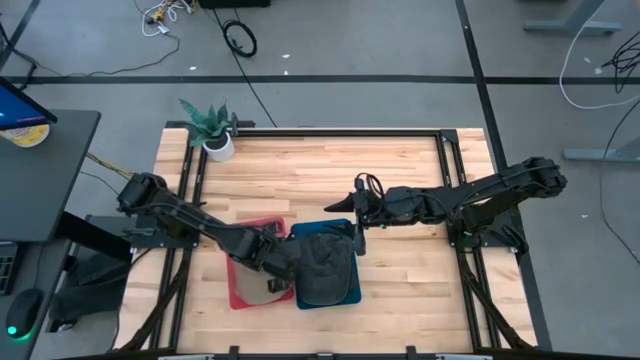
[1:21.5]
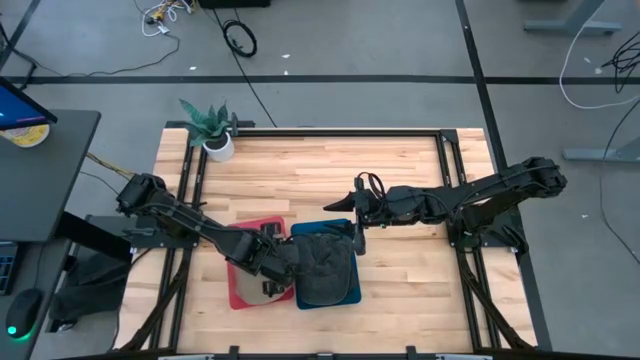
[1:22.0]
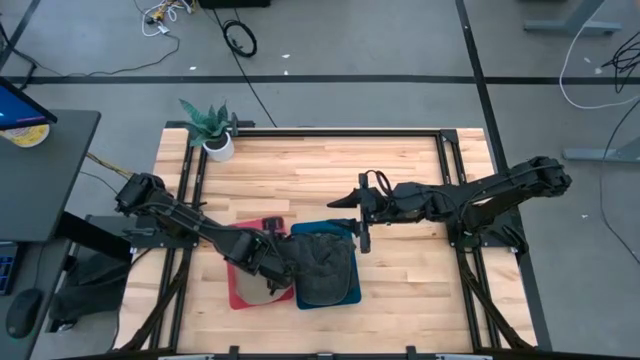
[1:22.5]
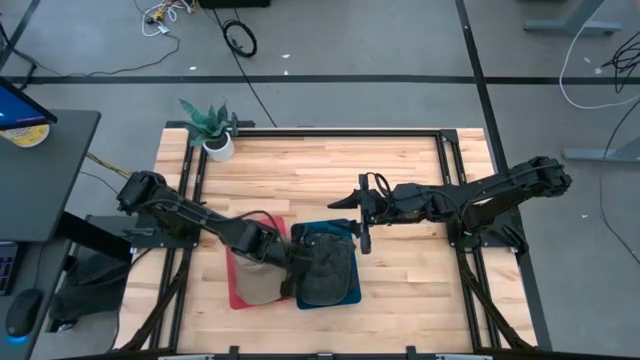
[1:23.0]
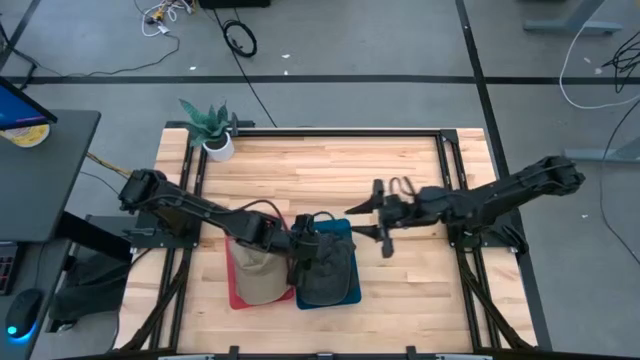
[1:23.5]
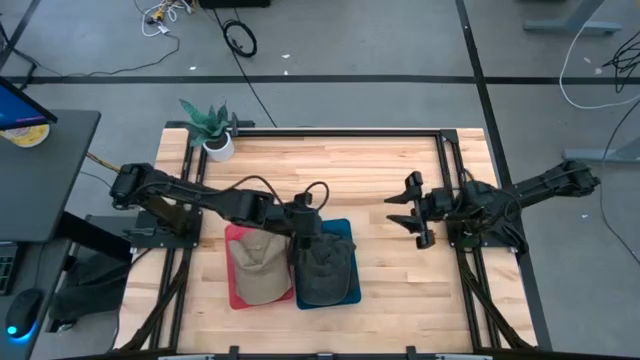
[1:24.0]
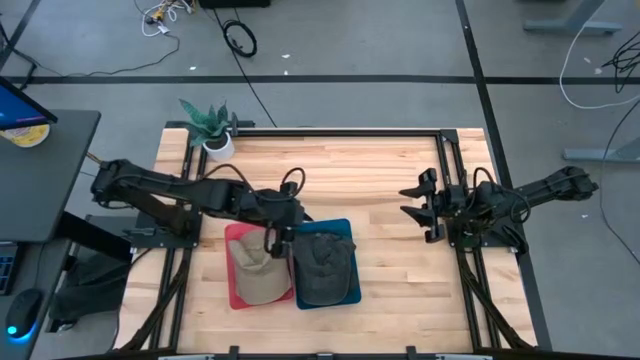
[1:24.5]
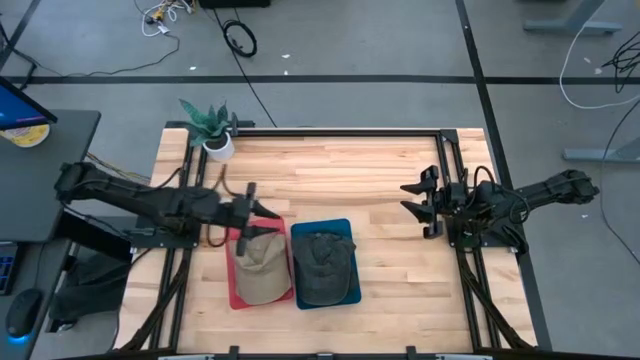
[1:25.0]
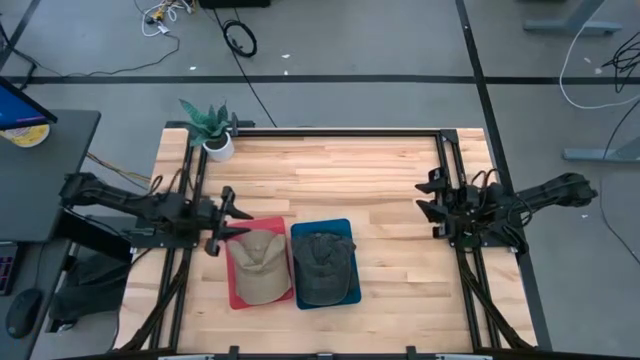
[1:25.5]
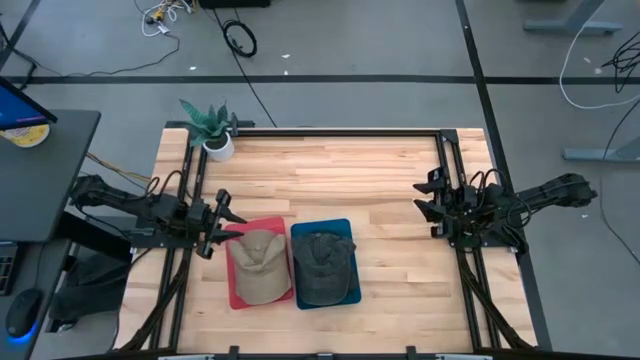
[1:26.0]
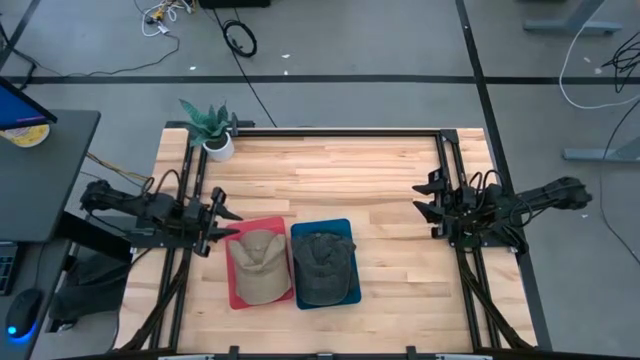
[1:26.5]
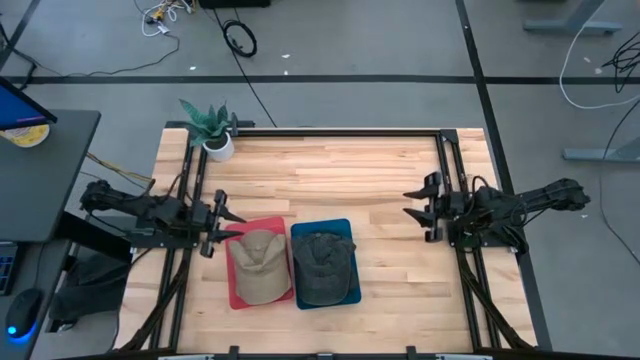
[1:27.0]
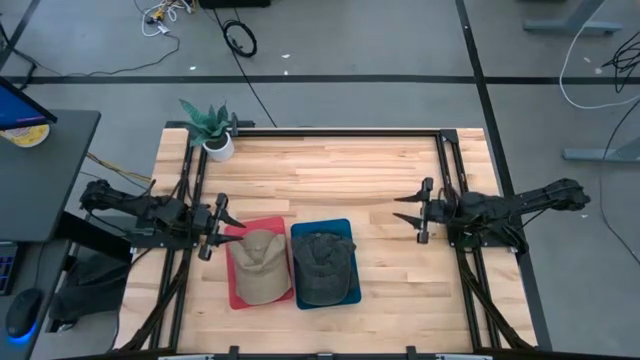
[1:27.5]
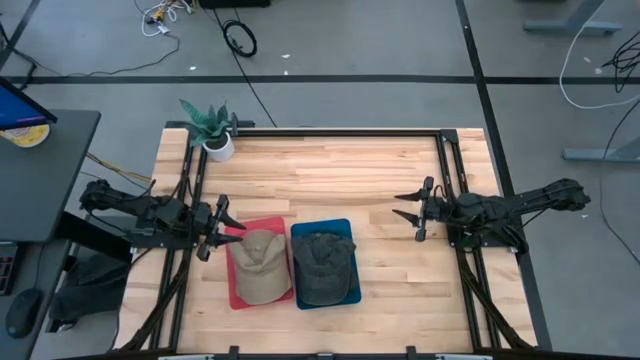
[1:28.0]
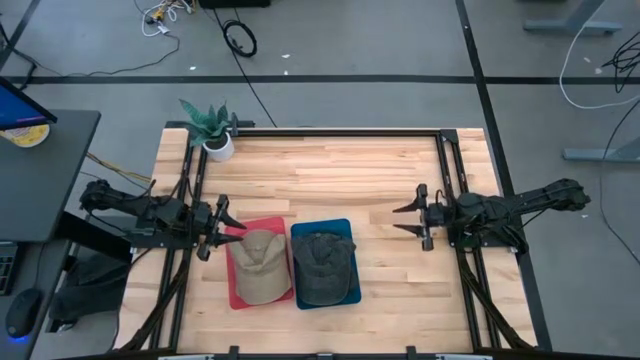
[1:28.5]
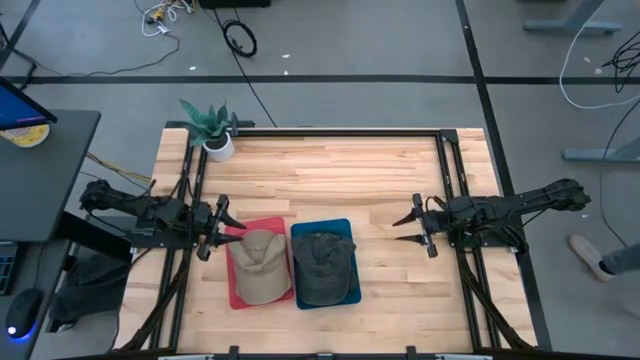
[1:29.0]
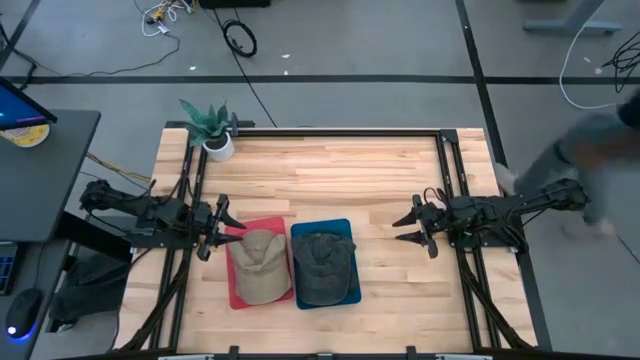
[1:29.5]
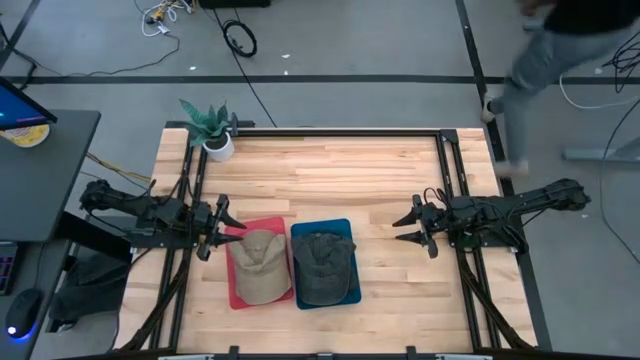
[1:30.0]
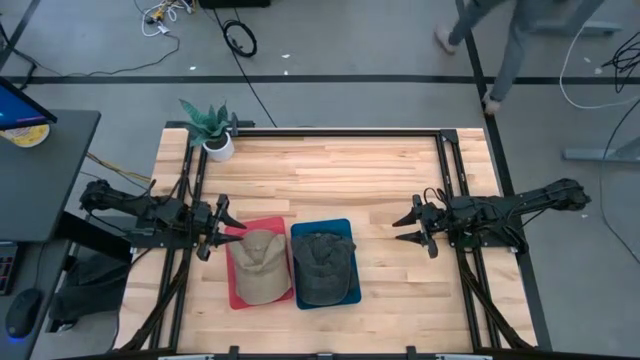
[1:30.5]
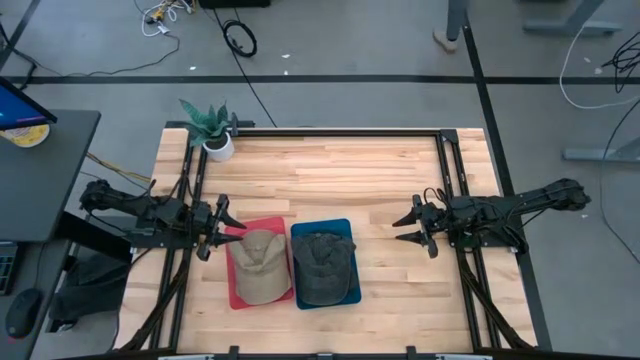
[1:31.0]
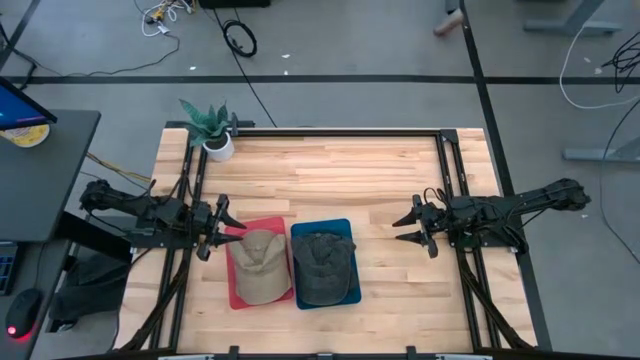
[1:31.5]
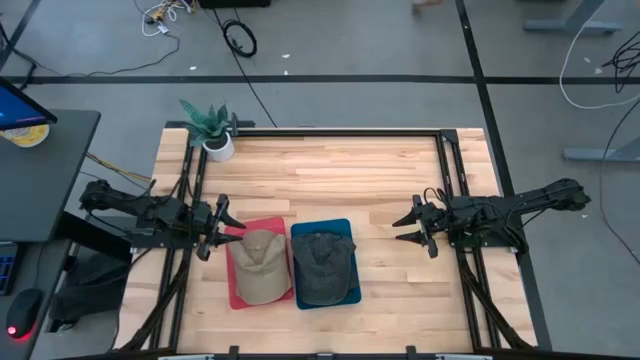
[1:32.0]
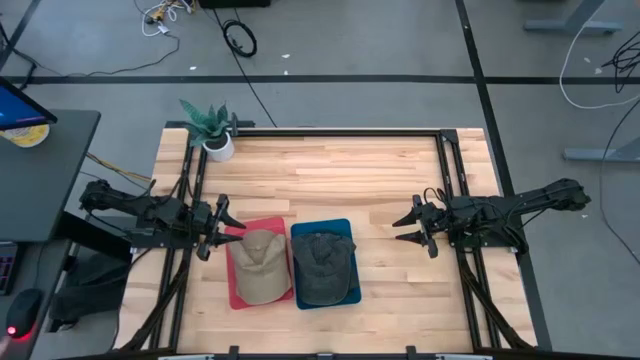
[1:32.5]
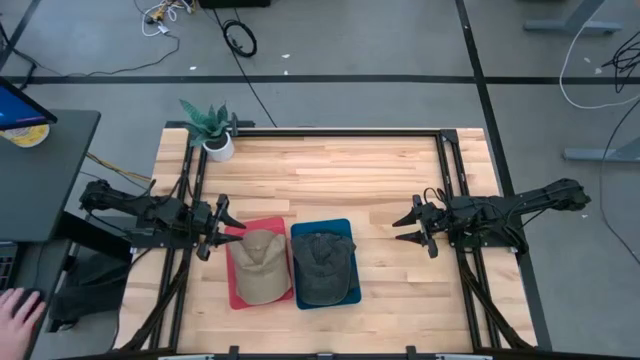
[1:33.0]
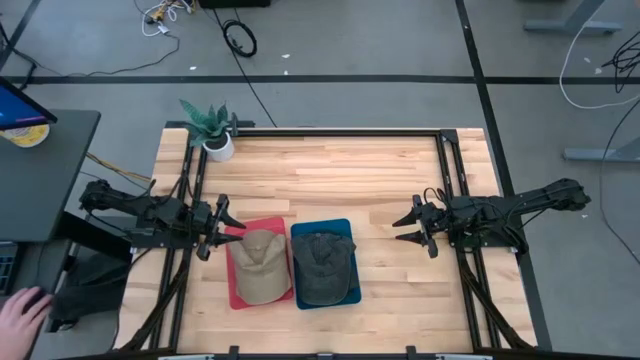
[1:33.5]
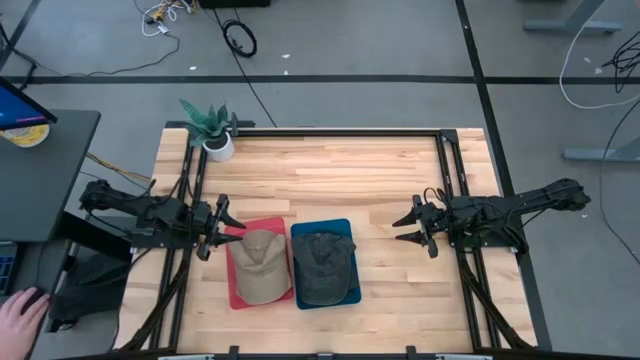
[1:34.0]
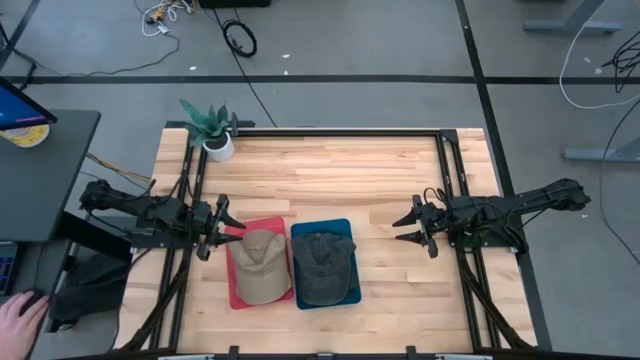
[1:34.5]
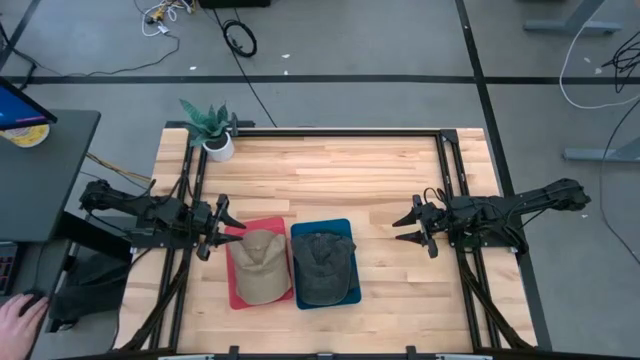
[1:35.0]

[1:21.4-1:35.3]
Task: Pick & Place hat
Return to Home Position

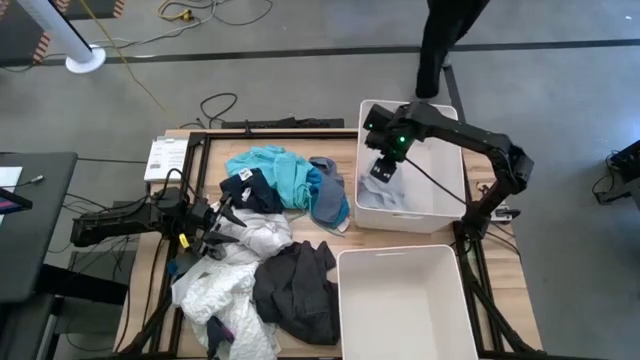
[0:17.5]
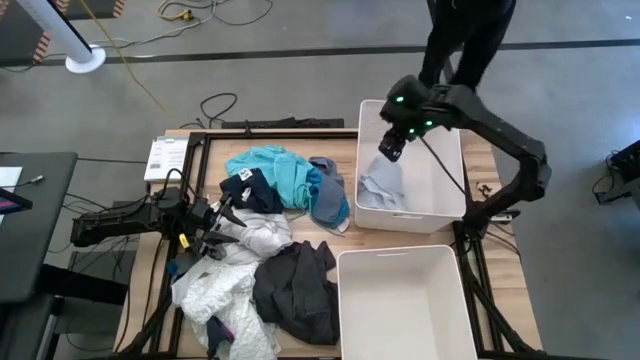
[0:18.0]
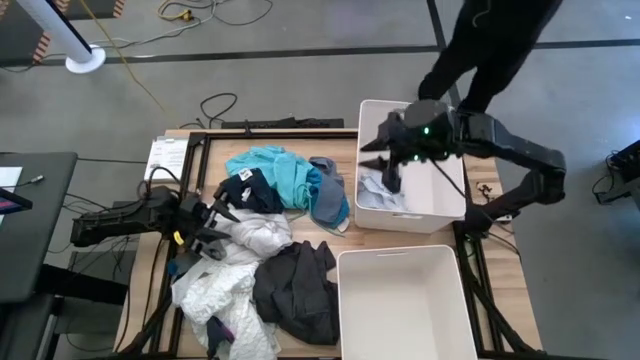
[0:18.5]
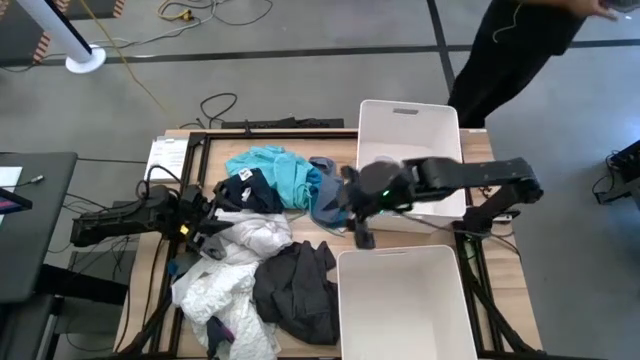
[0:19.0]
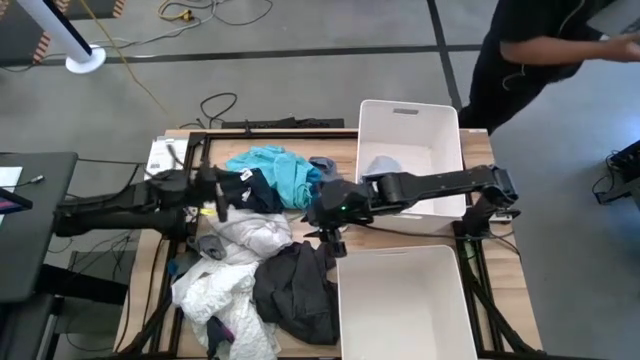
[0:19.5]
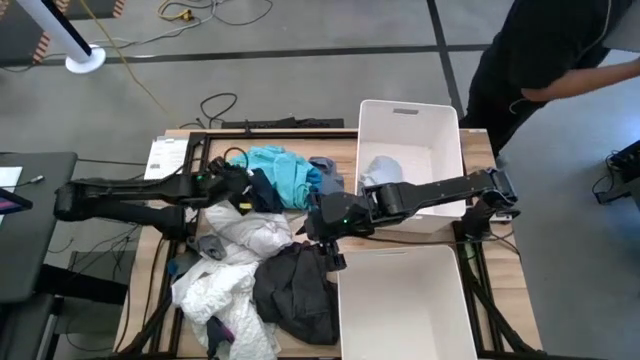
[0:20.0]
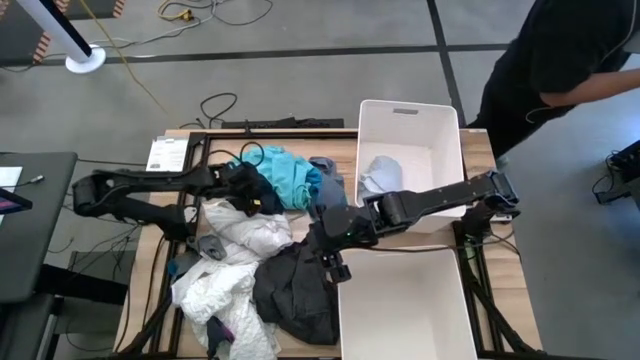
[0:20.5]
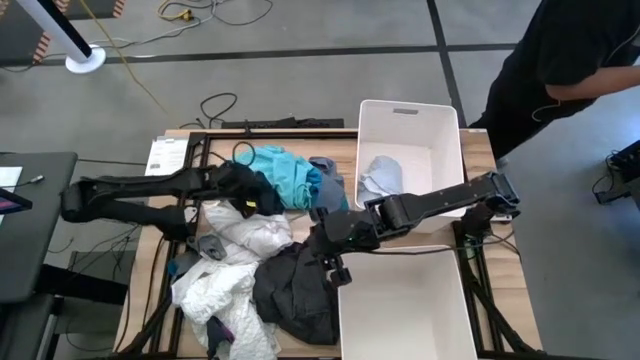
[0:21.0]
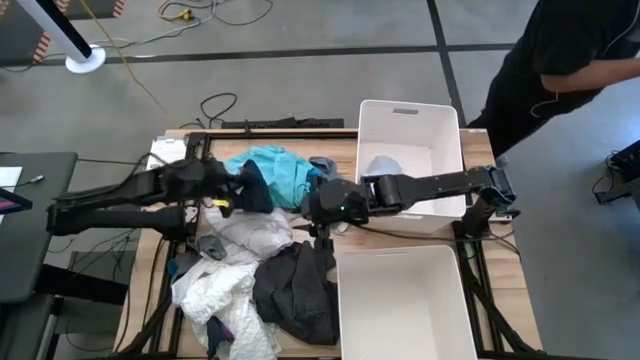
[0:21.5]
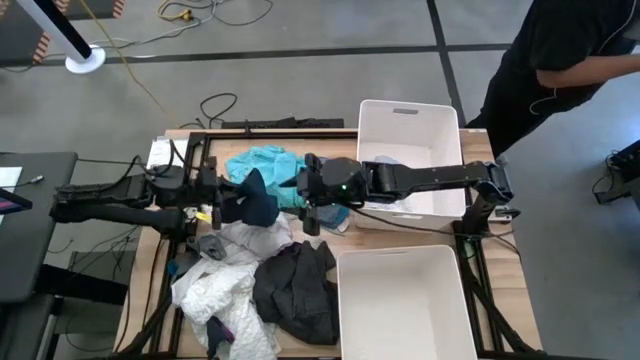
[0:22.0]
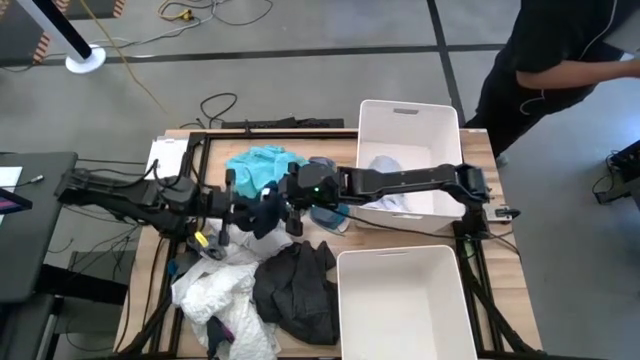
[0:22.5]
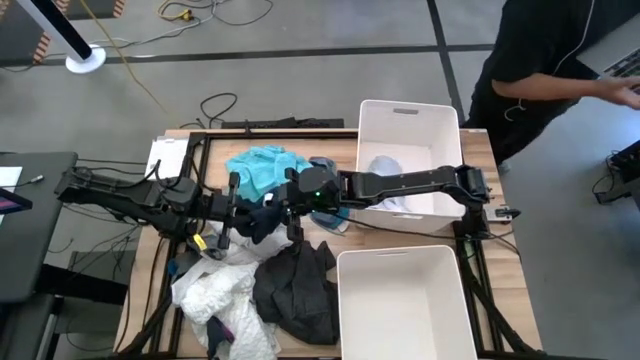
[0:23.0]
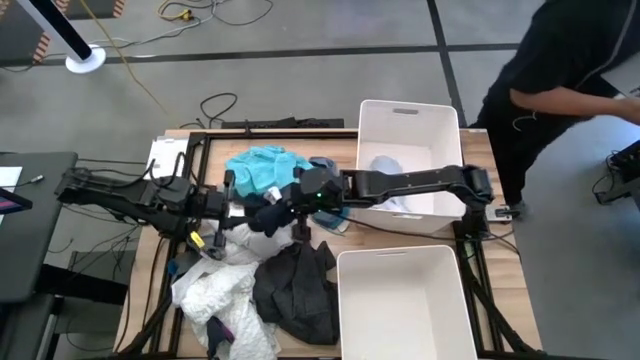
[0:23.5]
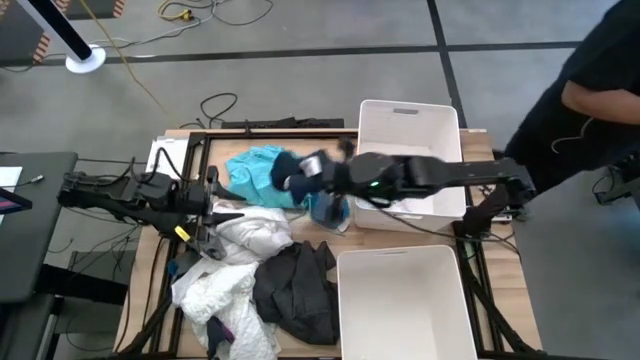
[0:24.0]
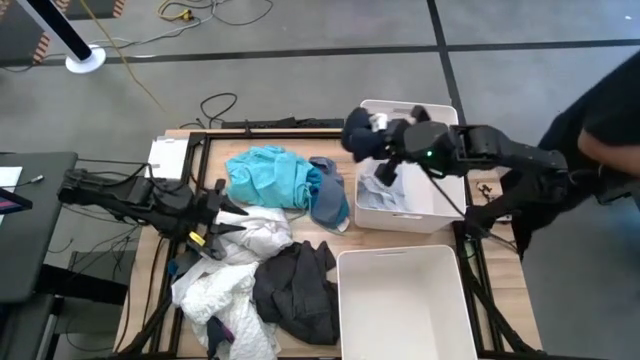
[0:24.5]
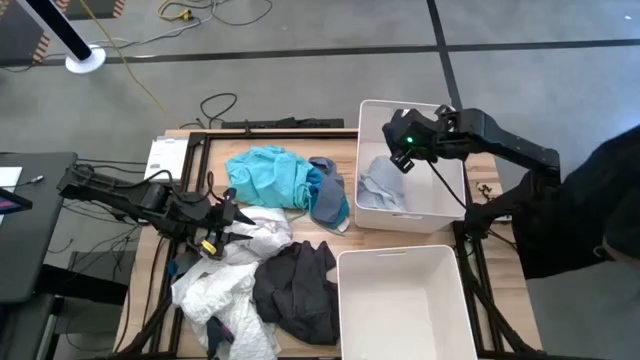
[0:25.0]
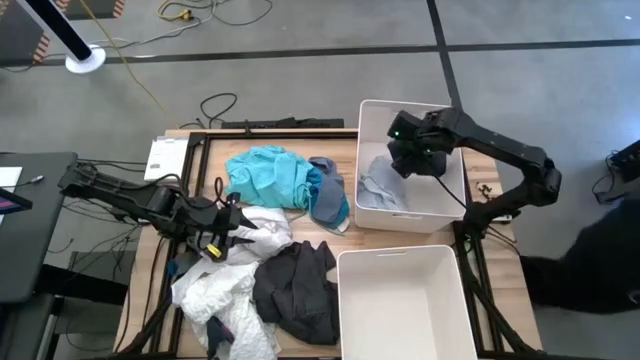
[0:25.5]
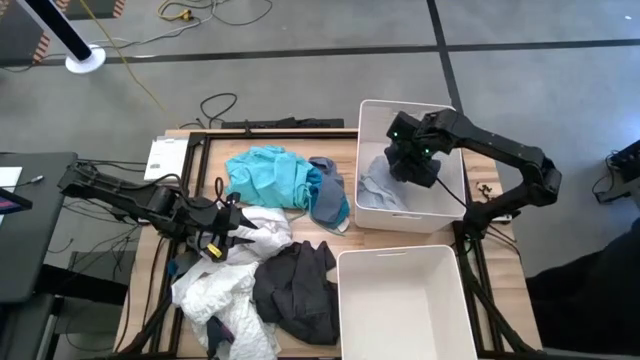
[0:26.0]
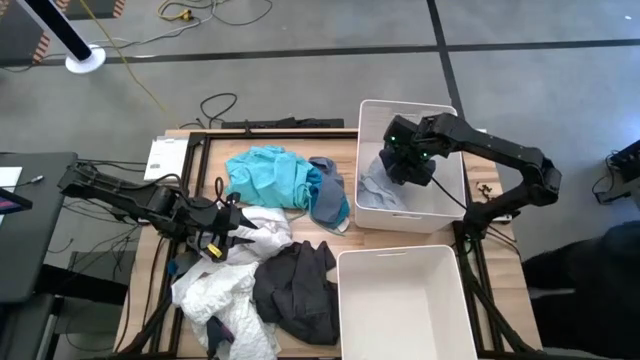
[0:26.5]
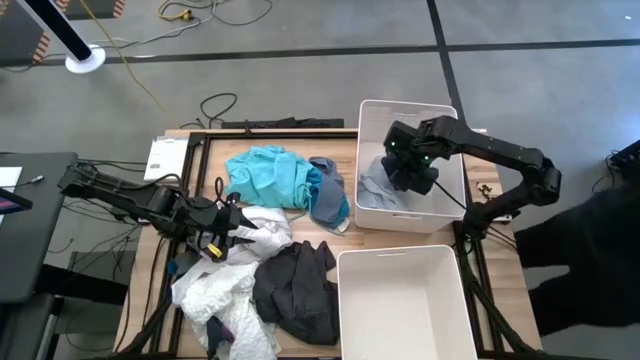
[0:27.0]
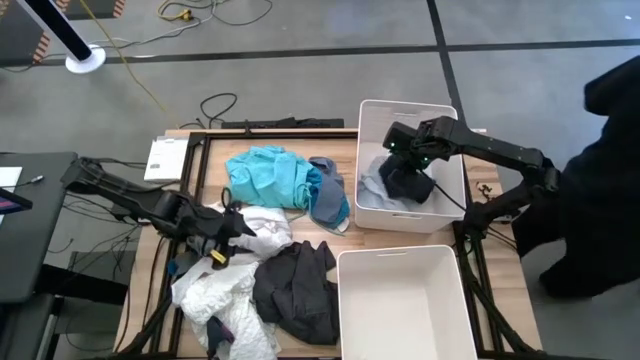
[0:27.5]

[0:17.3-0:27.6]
Task: Sort clothes
Put the black shorts into the top white laundry bin
